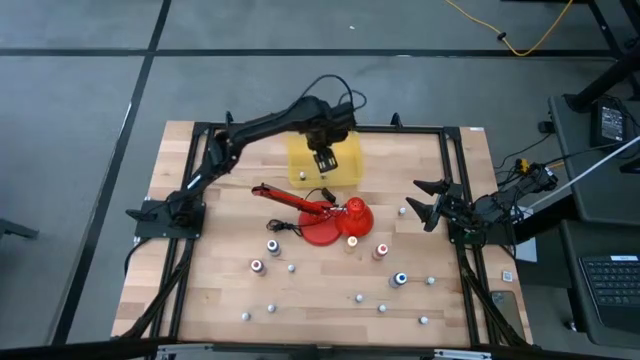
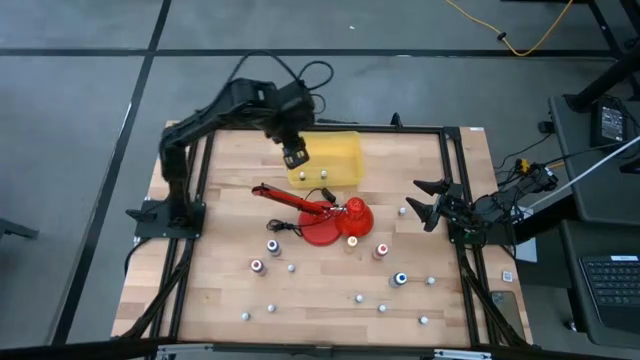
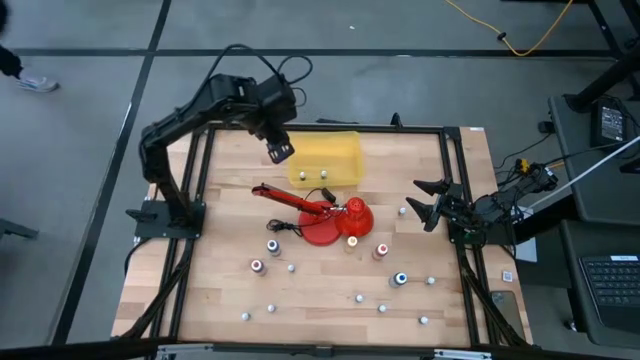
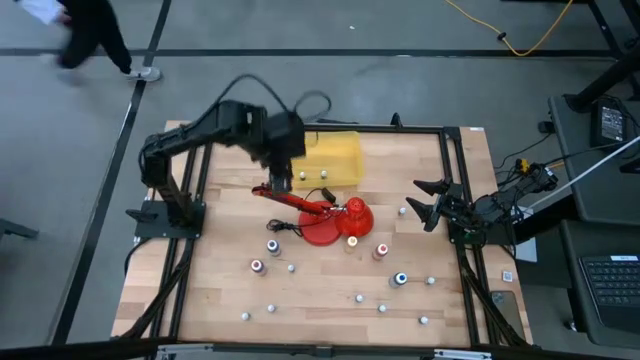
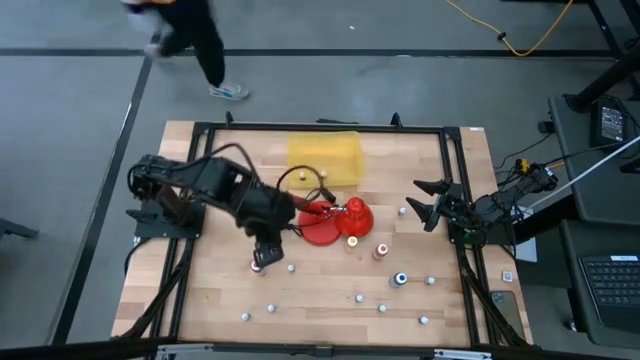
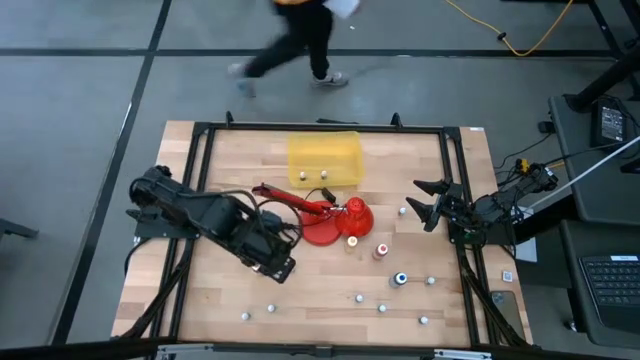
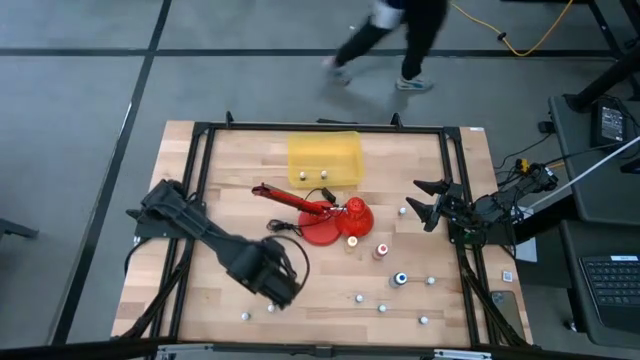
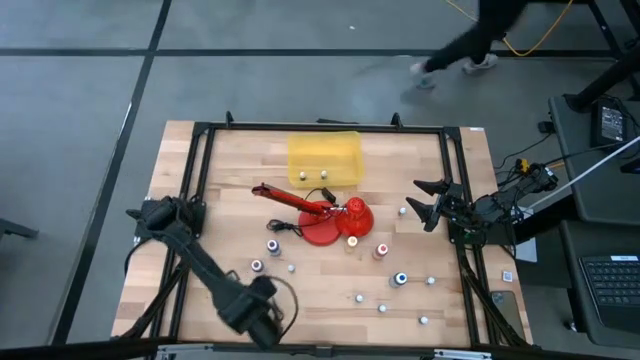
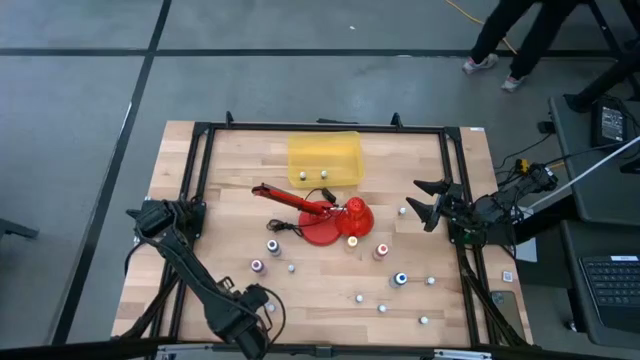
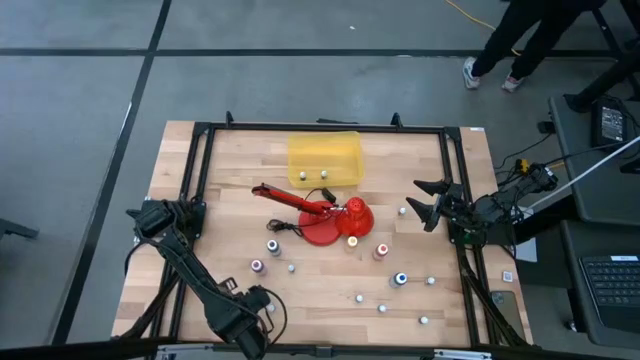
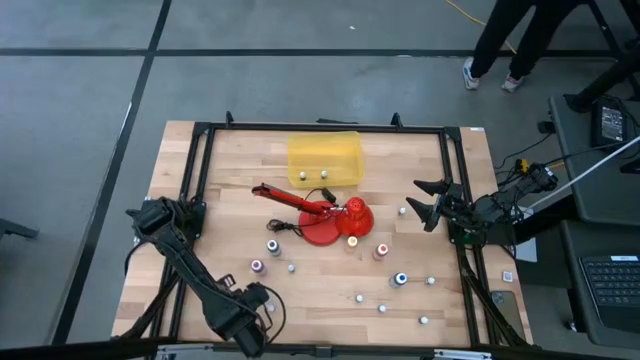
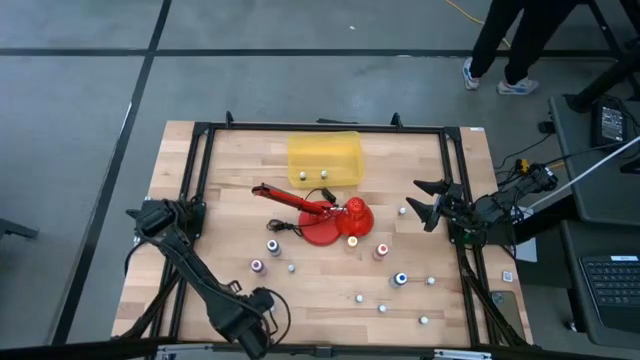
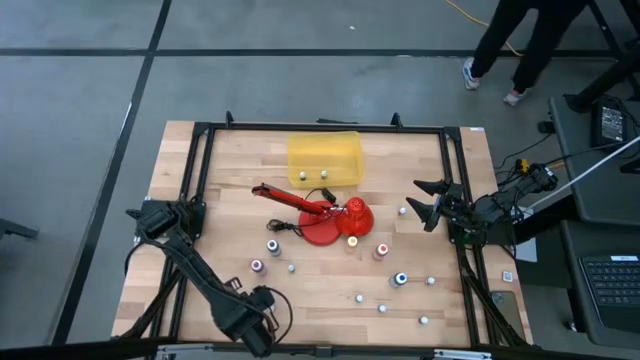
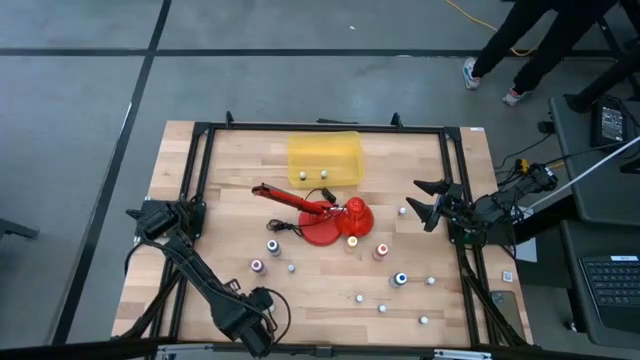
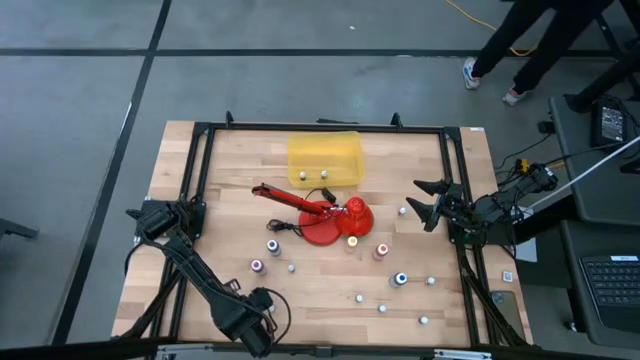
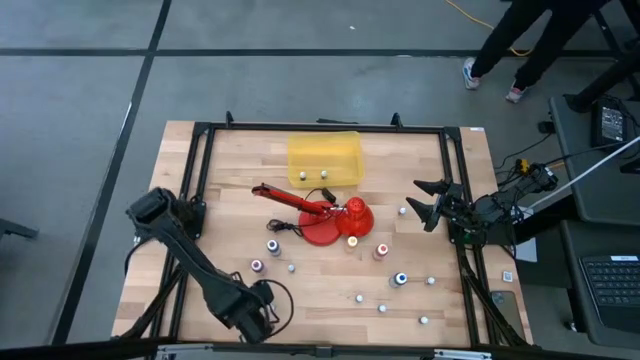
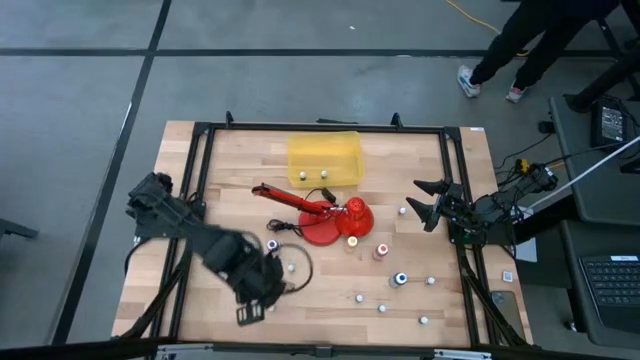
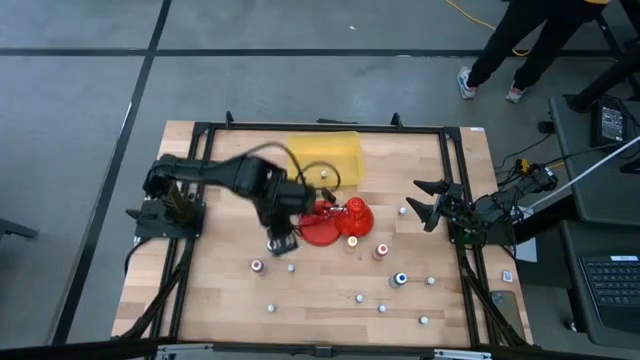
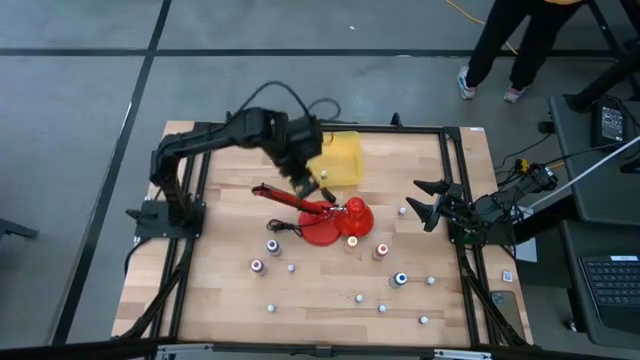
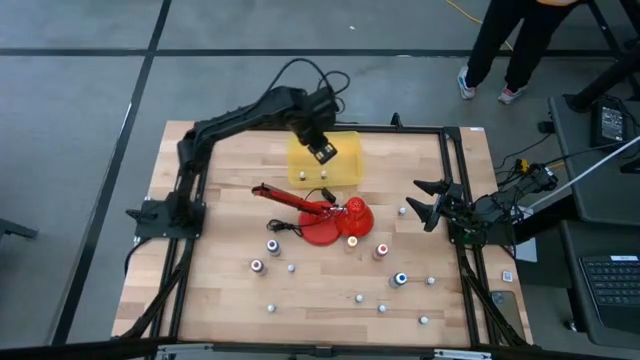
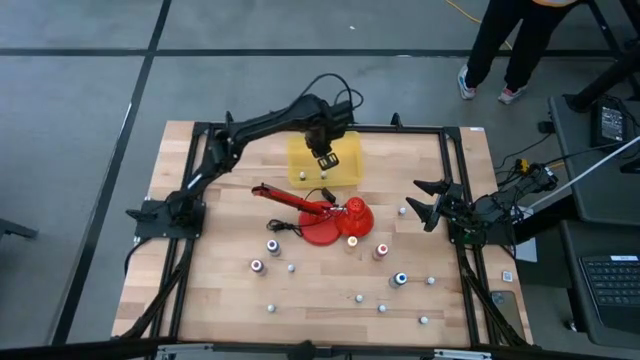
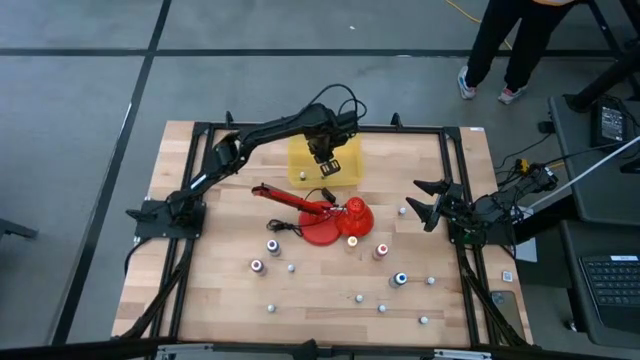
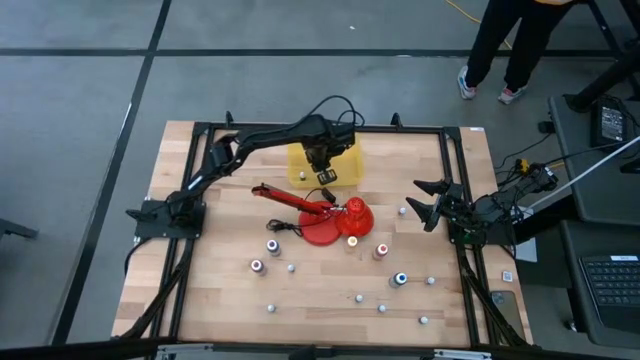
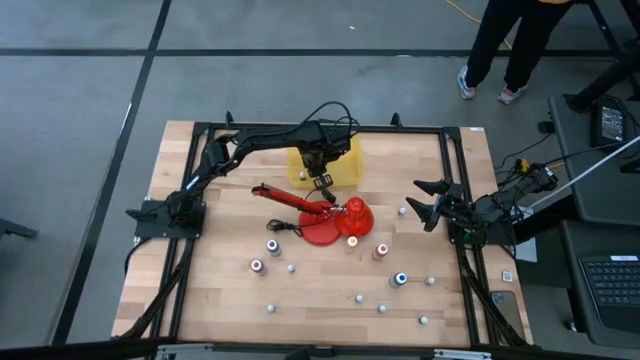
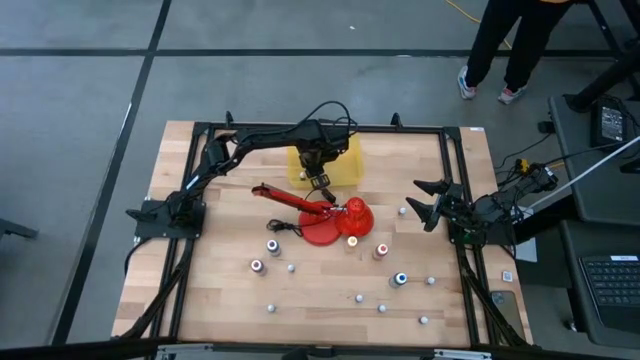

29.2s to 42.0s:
Task: Pick & Place food coloring
Put the black food coloring bottle into the yellow bin

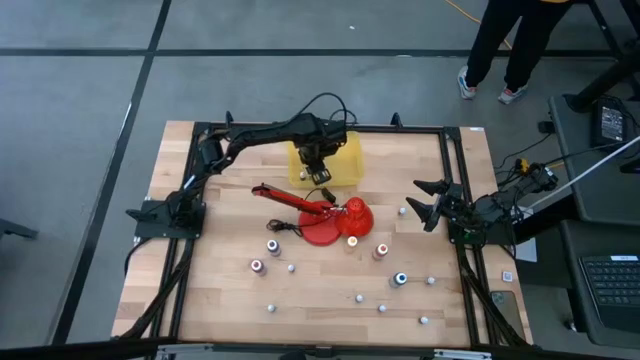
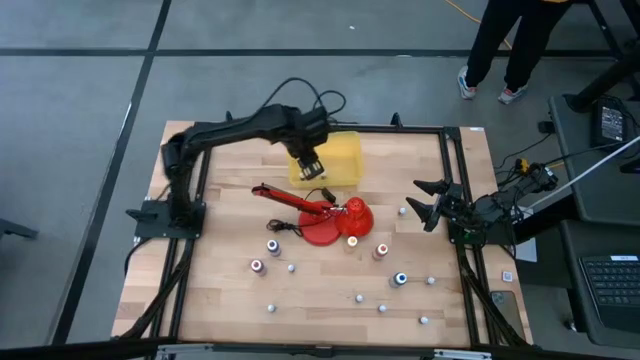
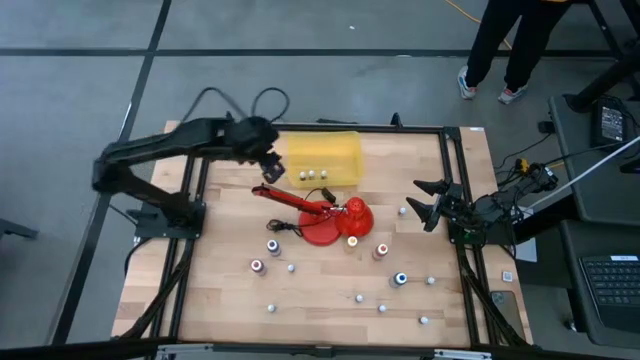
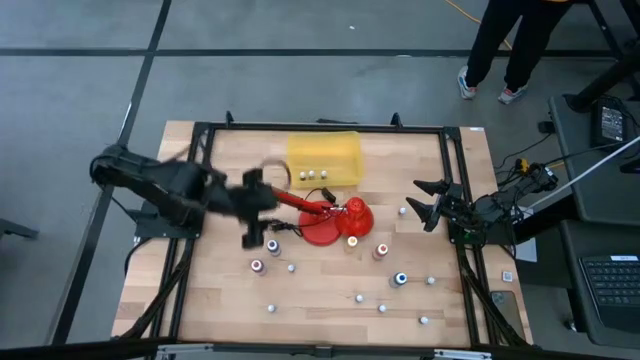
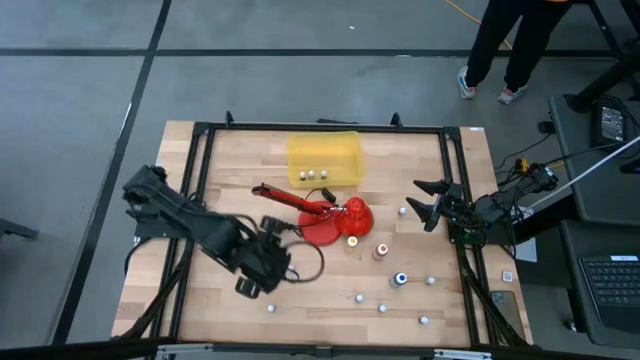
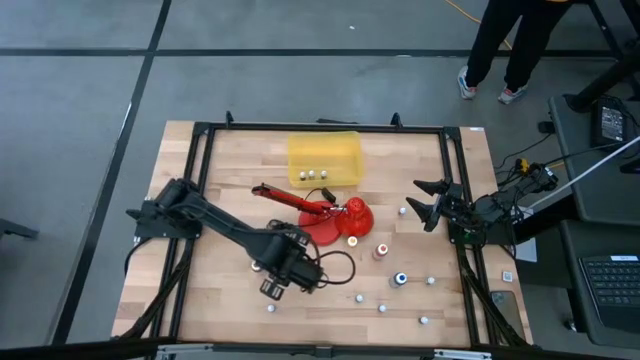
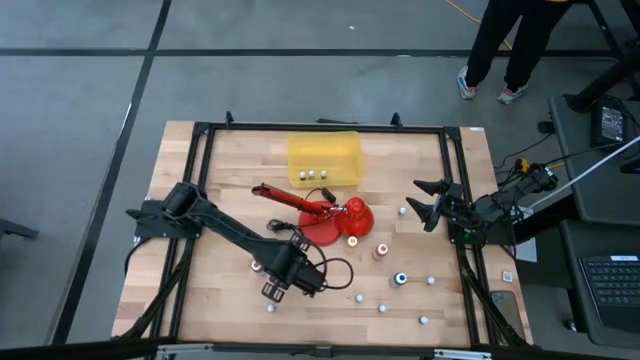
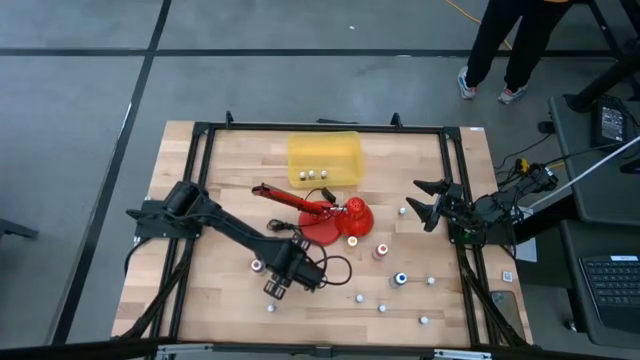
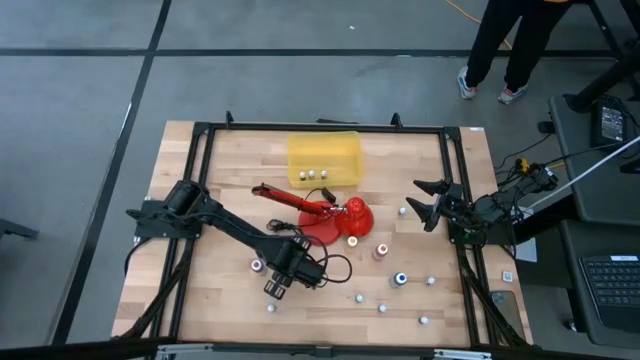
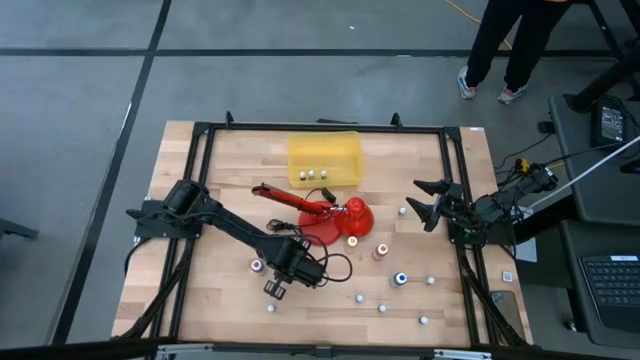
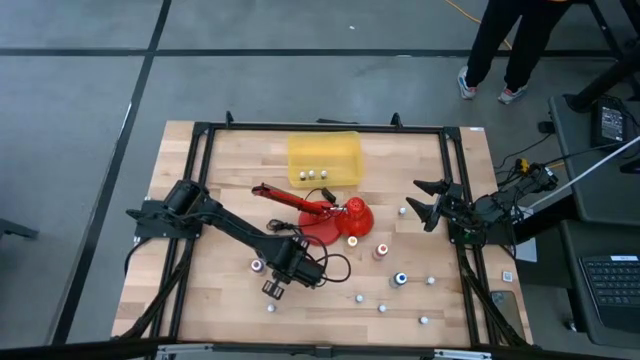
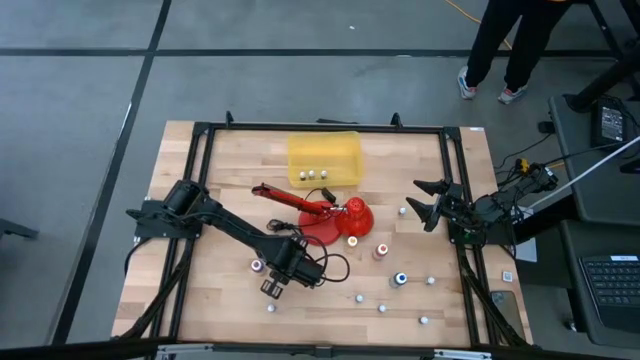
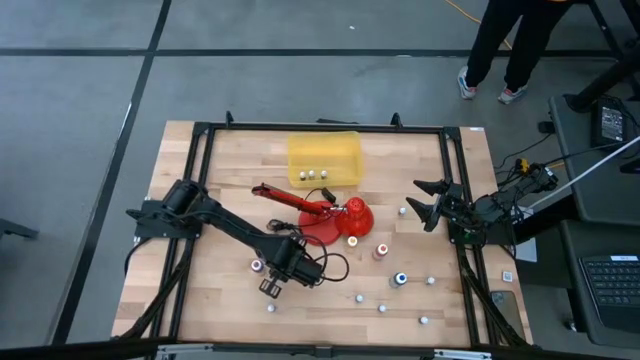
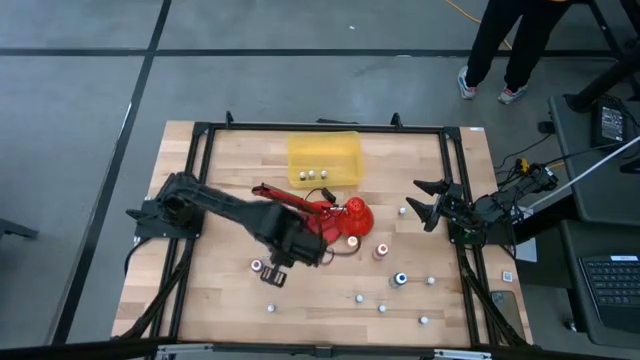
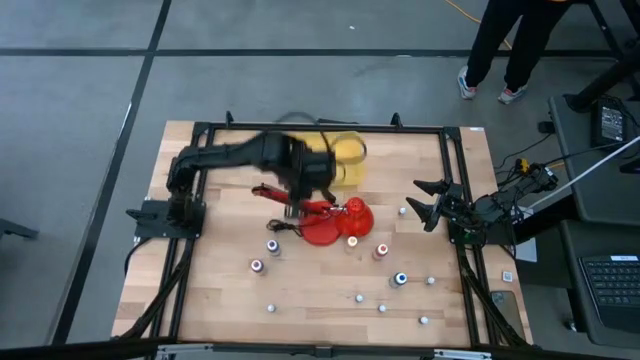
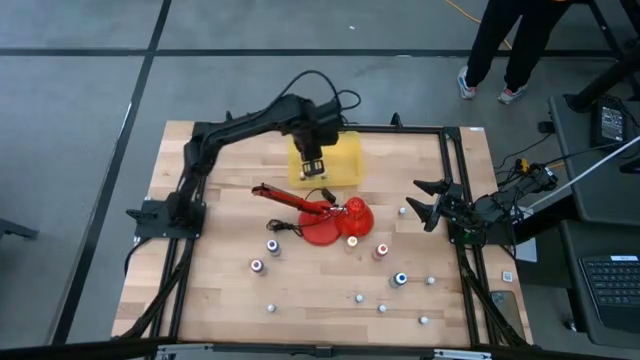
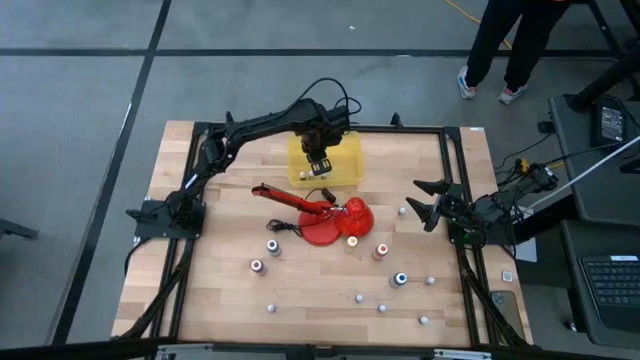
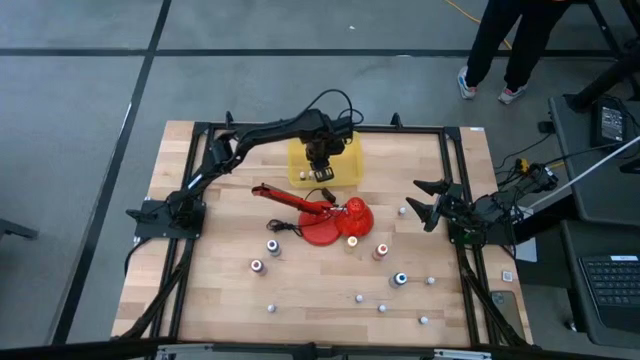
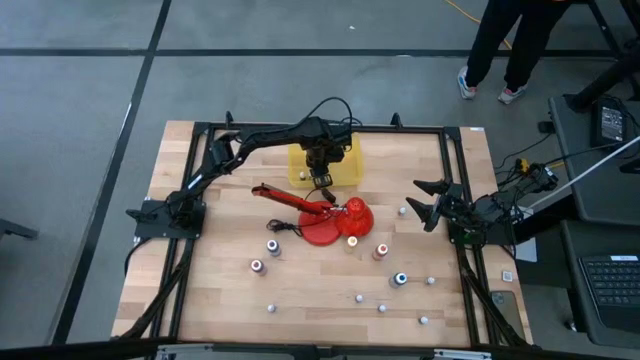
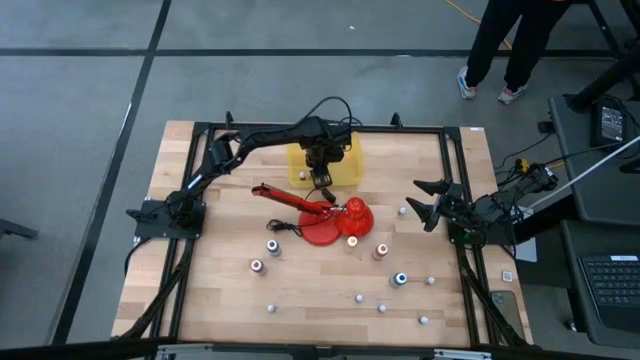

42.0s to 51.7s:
Put the black food coloring bottle into the yellow bin
